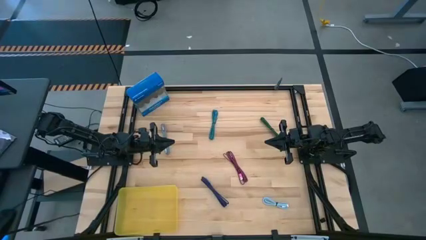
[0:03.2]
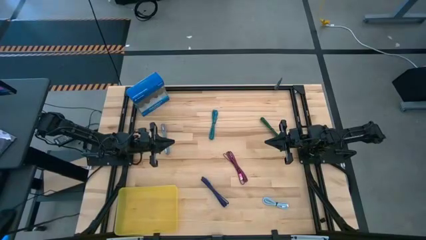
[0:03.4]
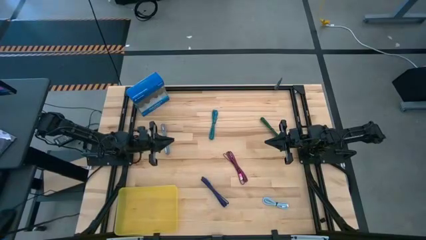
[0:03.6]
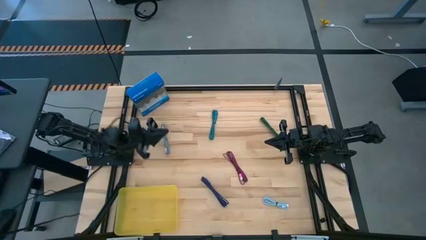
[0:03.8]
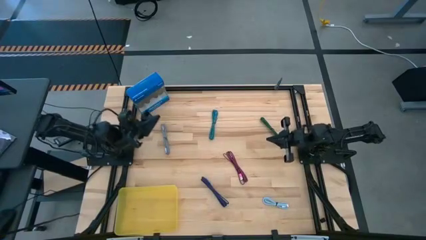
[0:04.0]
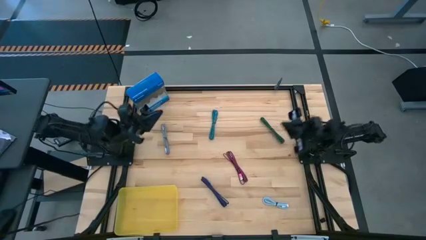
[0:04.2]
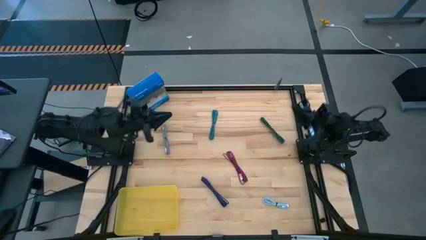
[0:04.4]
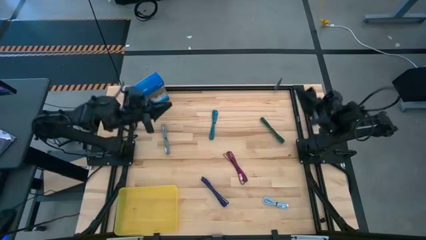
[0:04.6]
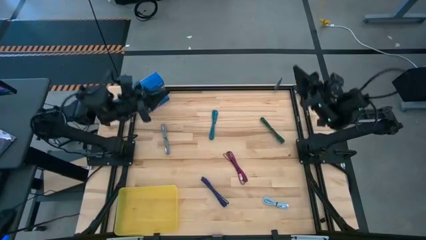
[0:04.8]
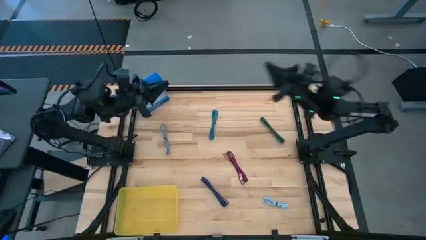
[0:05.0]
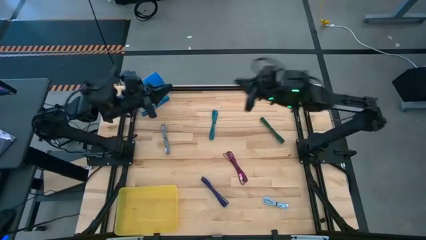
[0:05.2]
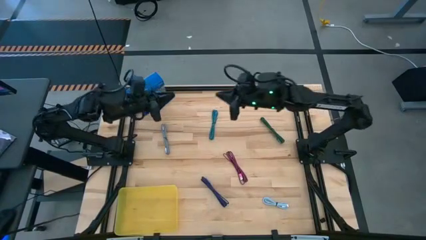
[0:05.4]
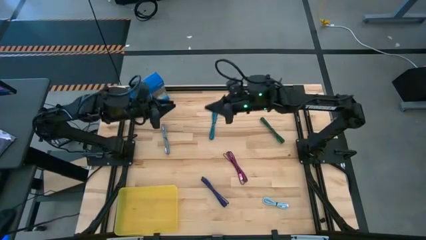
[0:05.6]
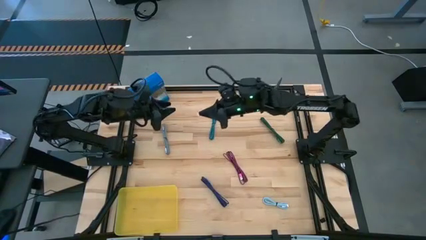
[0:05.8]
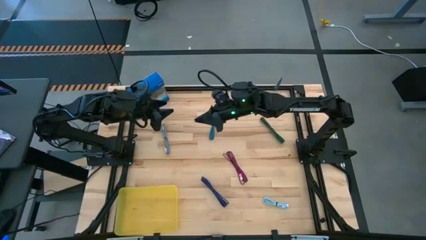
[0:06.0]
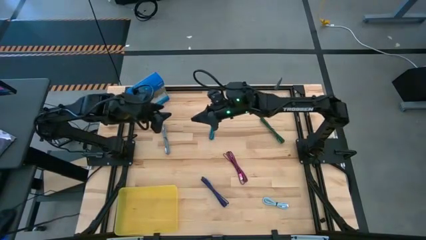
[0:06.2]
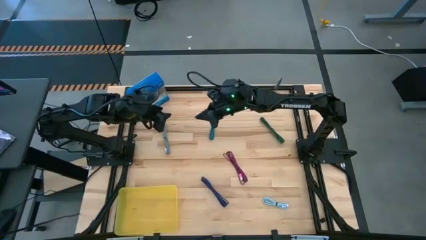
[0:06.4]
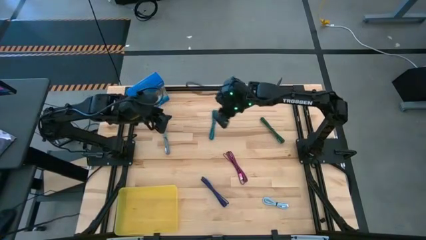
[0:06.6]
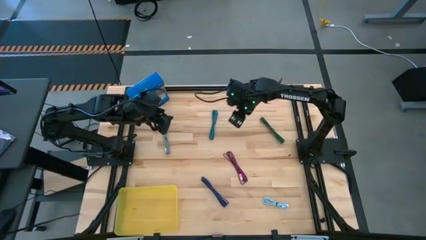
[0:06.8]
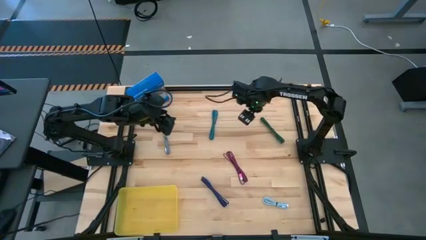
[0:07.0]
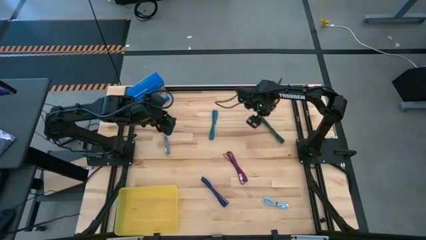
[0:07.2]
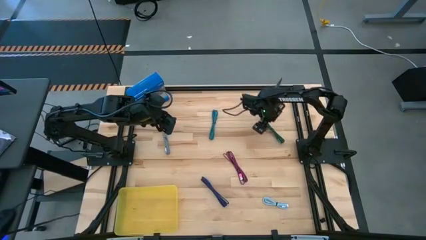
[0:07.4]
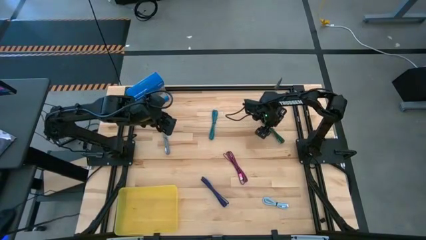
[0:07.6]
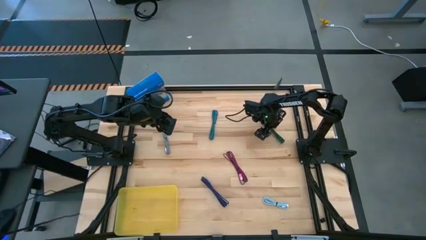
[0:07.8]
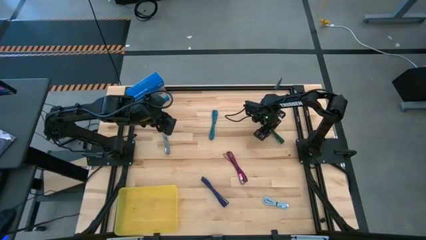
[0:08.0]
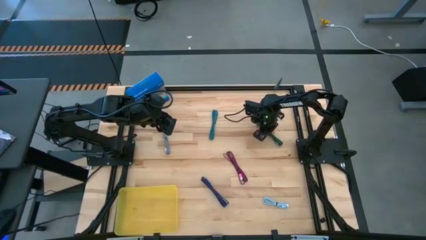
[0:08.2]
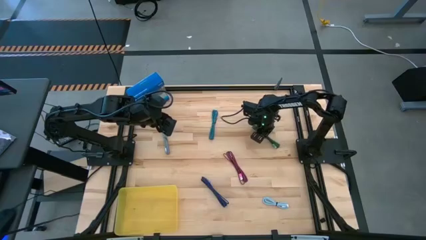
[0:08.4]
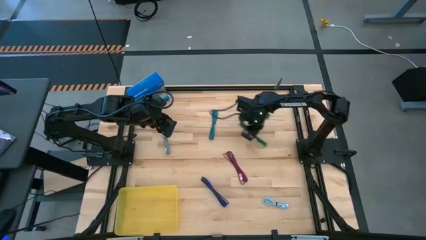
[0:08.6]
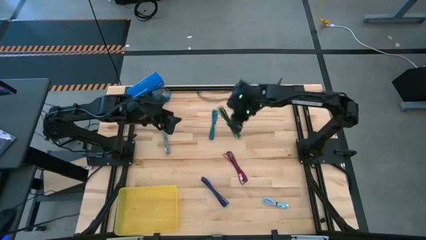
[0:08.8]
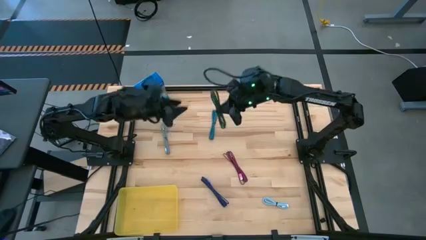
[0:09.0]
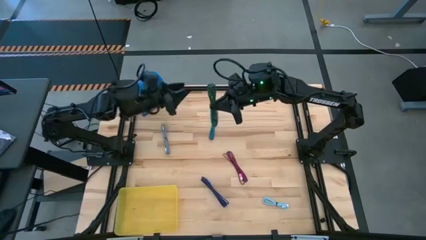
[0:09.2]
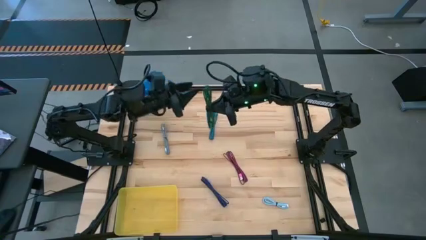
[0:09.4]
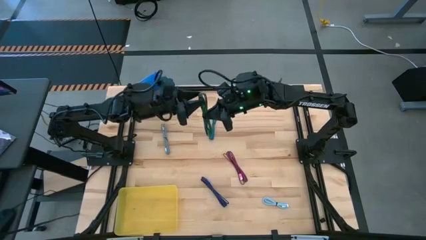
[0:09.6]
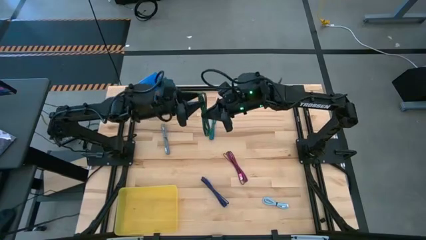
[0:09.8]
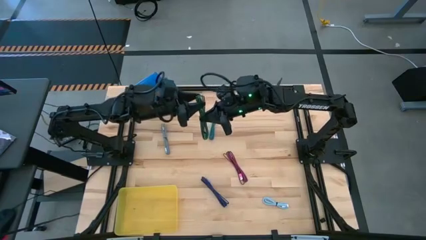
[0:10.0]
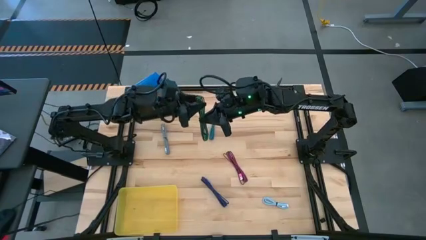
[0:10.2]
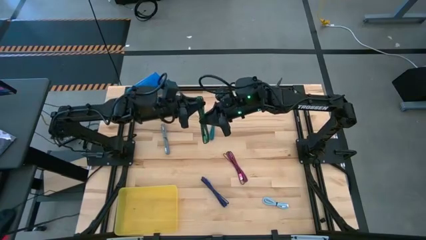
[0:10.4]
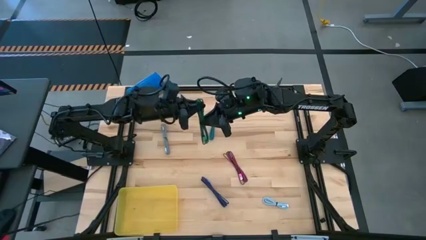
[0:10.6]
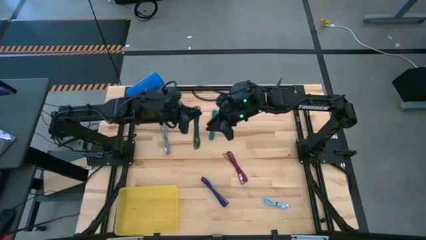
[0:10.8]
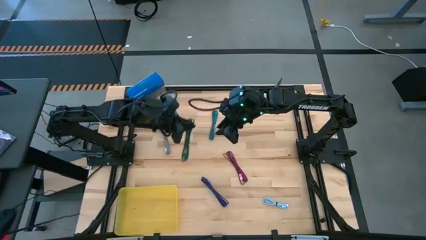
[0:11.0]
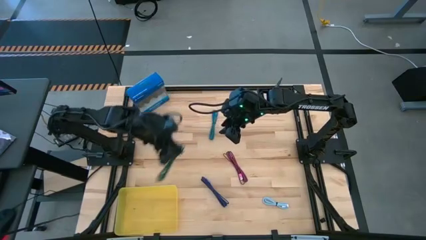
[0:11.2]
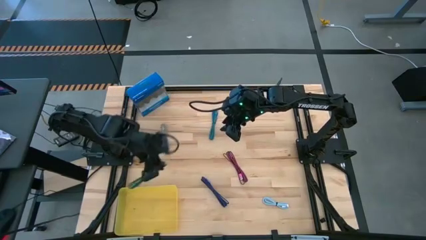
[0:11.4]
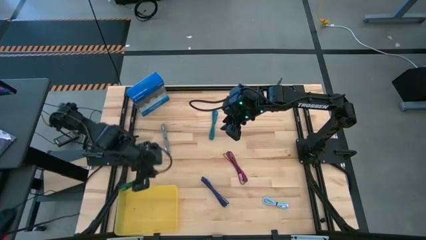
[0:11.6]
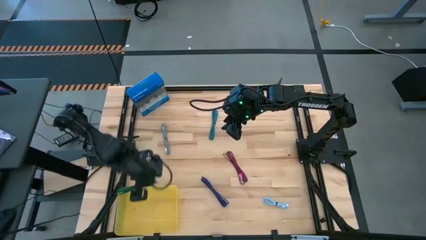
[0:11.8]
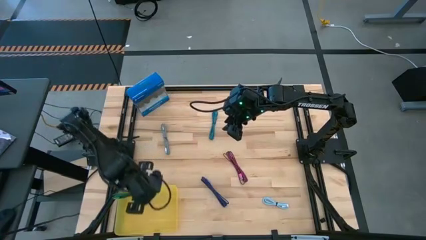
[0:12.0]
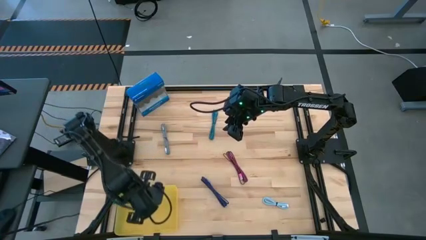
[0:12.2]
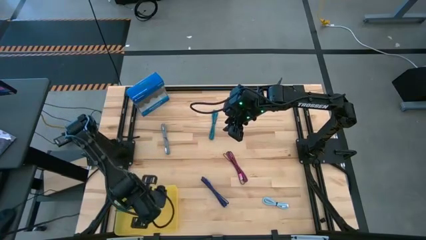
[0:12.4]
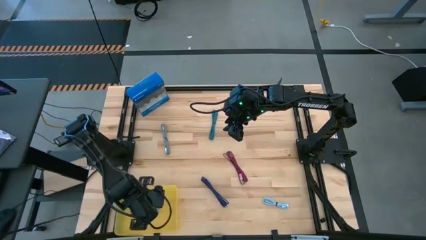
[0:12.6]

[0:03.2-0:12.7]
Task: Pick and place USB-C Cables
Put the green charger cable into the yellow bin

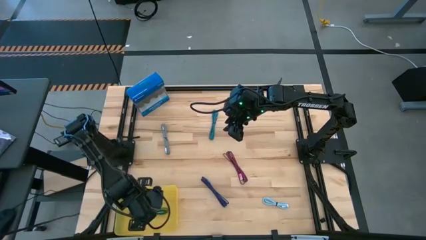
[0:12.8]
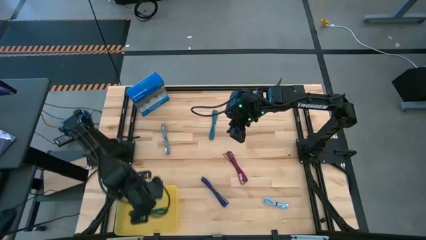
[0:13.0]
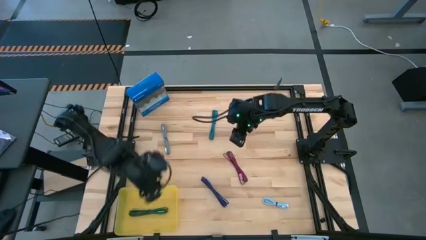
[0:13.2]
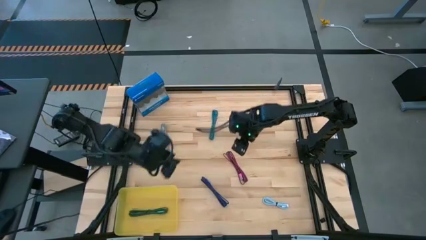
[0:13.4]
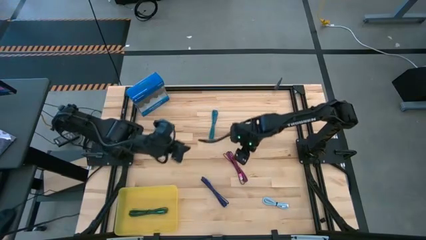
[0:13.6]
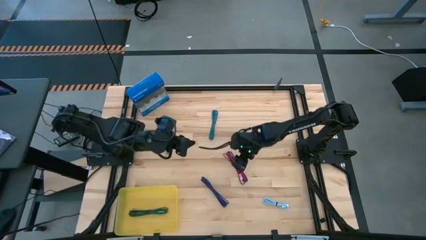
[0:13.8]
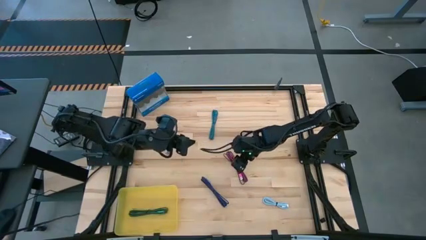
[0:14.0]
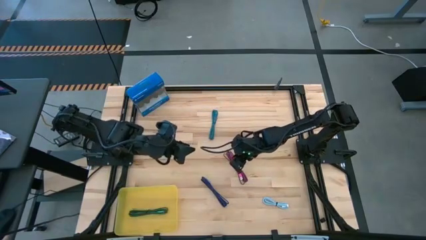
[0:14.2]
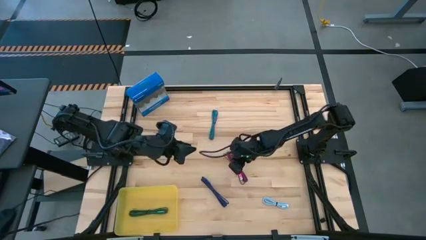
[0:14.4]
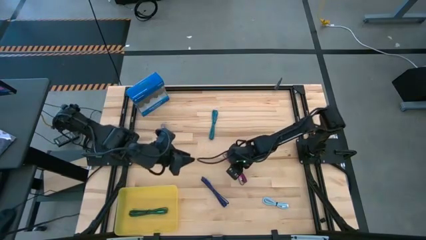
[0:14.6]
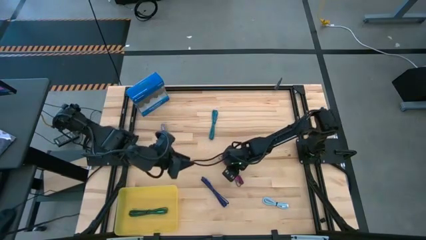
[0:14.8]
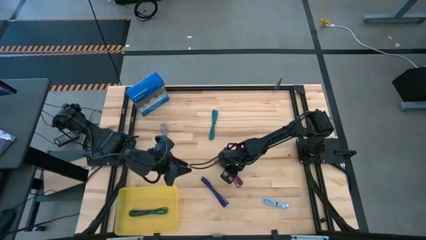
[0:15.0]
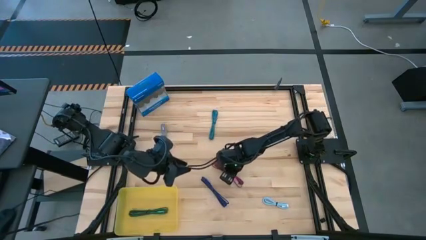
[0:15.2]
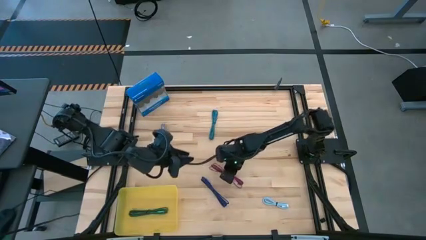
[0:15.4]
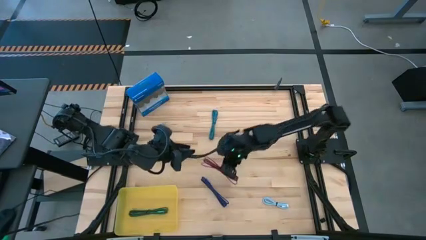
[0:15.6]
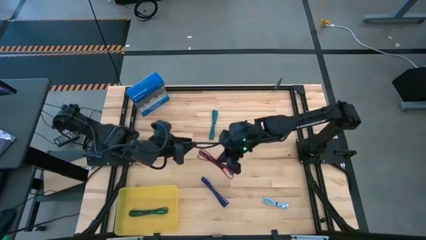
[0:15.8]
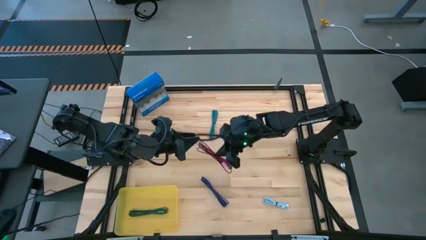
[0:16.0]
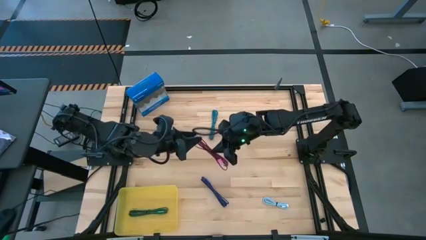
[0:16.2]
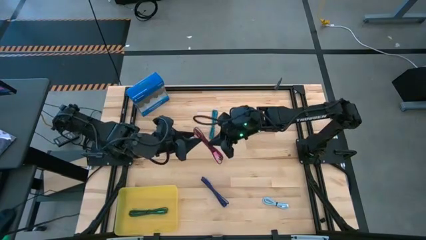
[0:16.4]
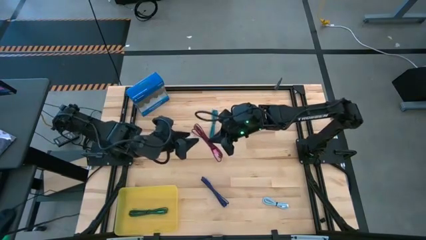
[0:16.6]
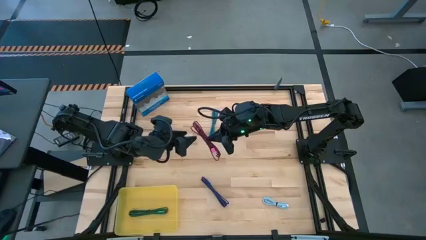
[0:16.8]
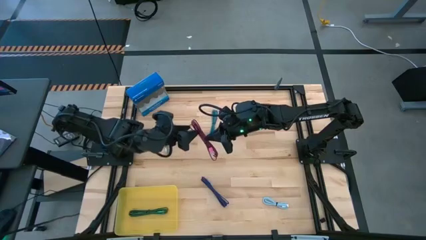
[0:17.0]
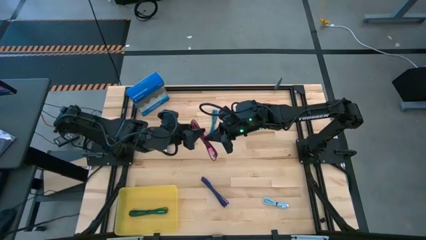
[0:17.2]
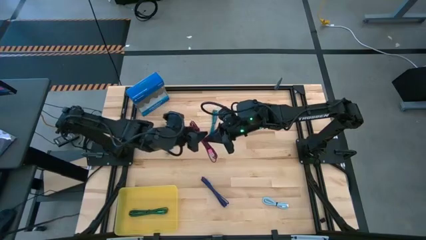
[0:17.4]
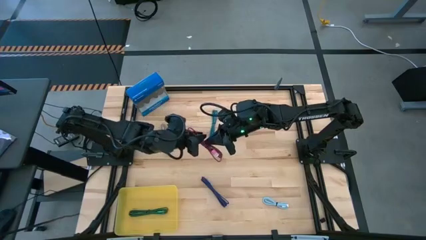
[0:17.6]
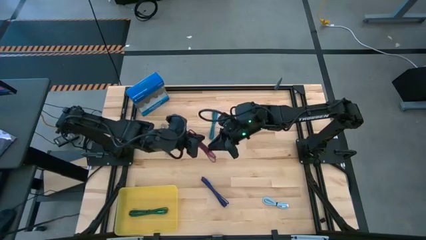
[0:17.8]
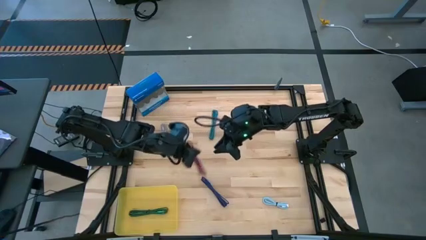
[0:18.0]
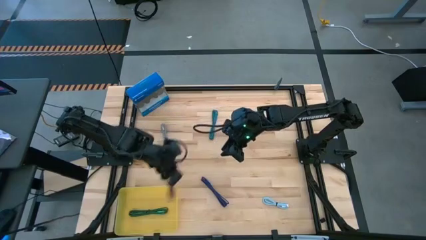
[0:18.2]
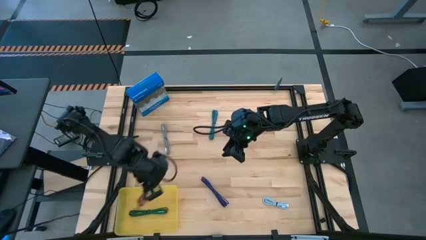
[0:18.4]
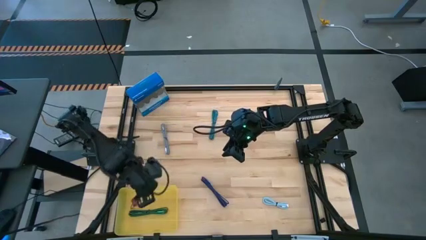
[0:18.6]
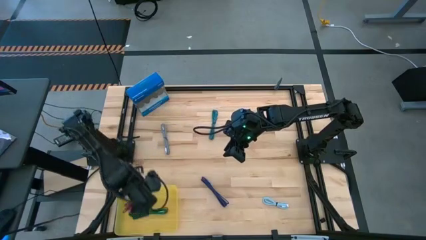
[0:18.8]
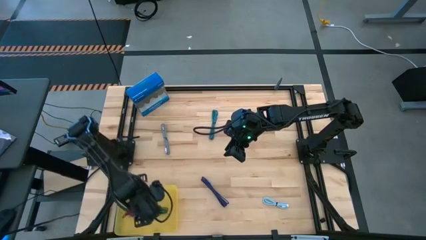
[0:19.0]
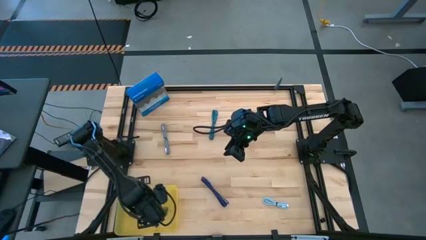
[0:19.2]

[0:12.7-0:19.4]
Put the pink charger cable into the yellow bin
